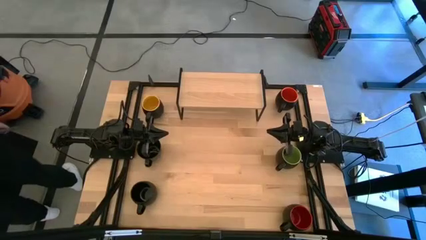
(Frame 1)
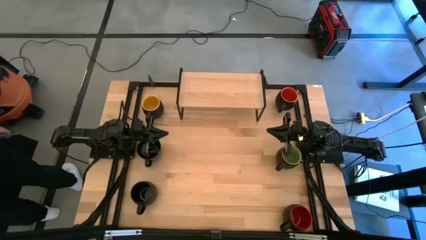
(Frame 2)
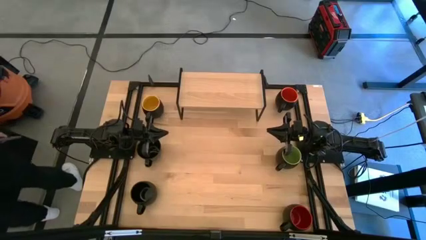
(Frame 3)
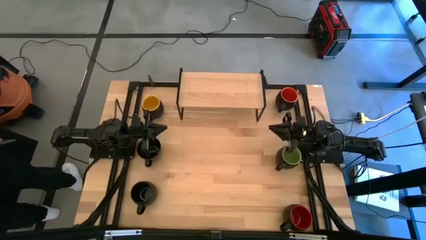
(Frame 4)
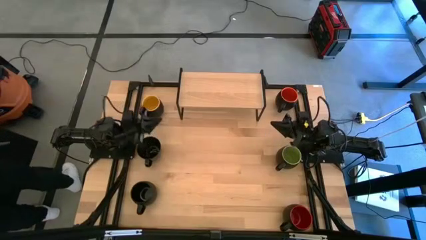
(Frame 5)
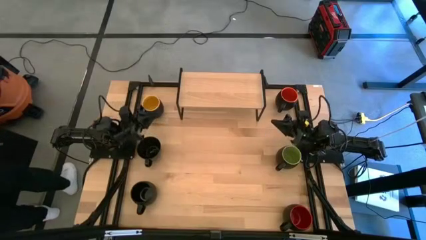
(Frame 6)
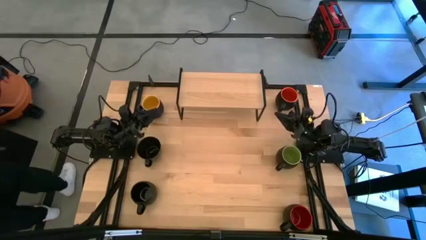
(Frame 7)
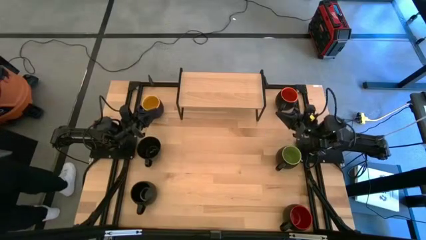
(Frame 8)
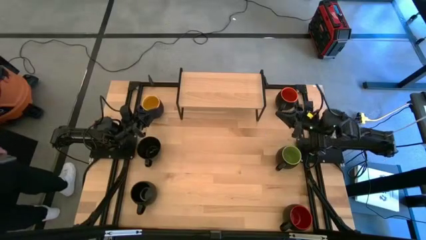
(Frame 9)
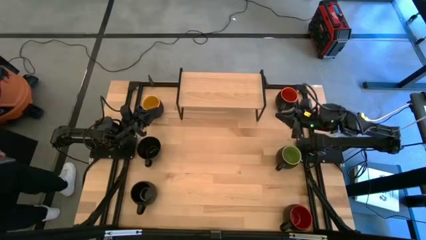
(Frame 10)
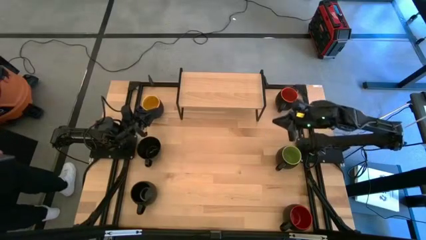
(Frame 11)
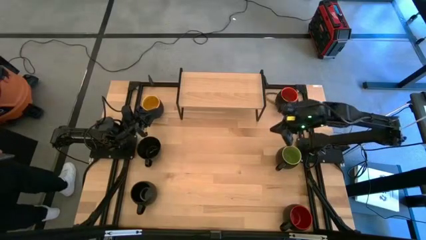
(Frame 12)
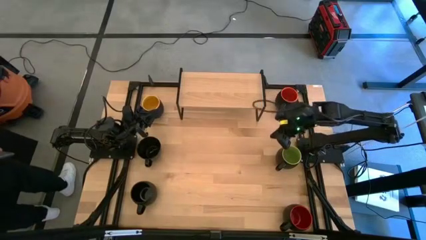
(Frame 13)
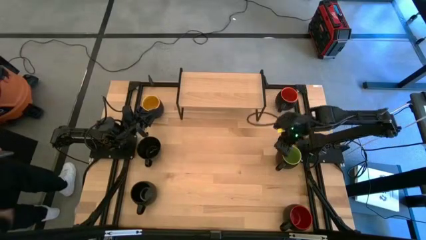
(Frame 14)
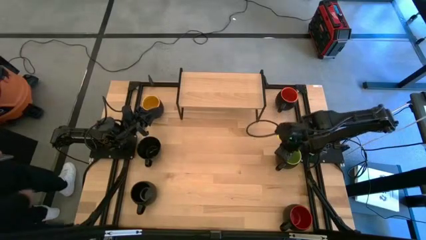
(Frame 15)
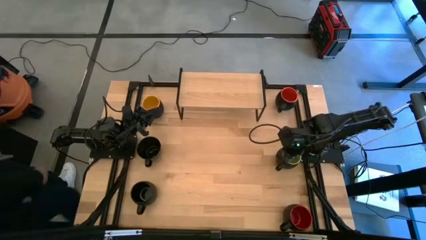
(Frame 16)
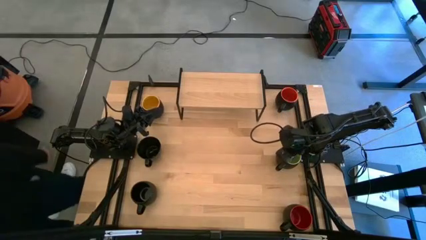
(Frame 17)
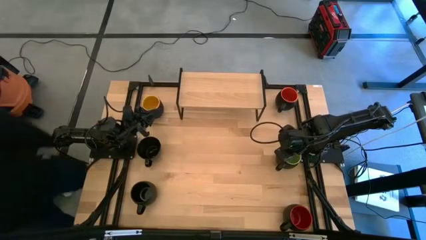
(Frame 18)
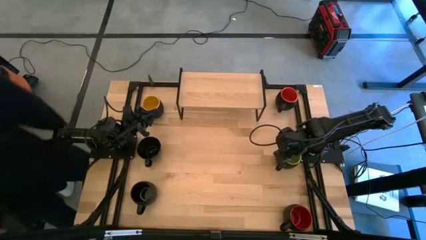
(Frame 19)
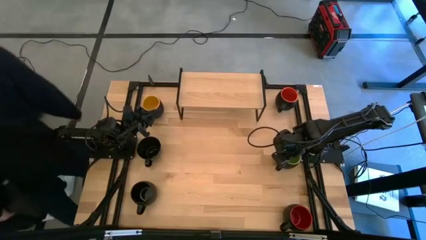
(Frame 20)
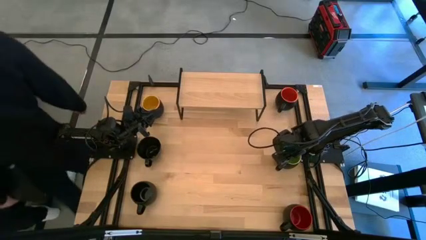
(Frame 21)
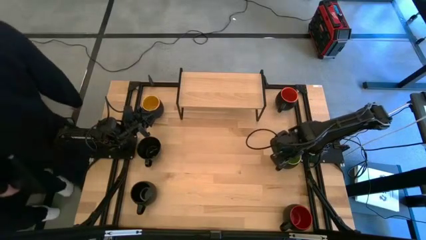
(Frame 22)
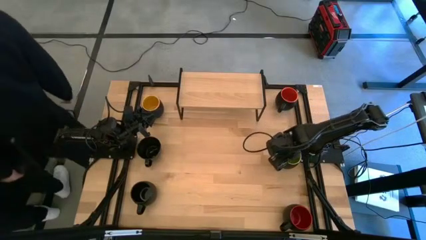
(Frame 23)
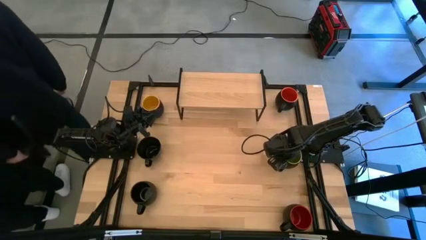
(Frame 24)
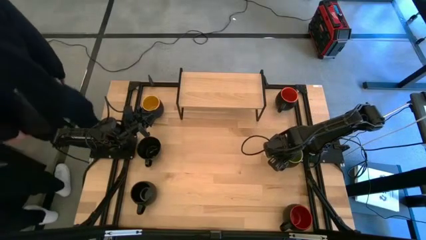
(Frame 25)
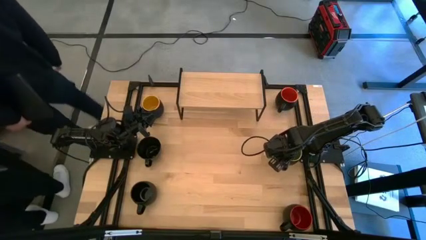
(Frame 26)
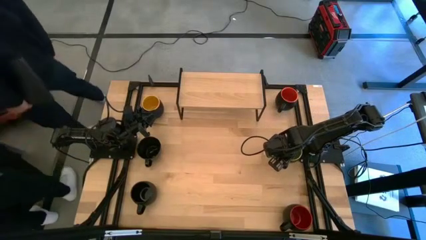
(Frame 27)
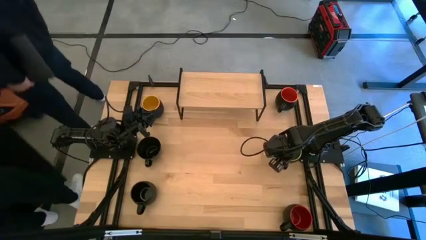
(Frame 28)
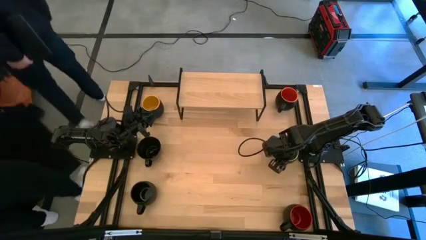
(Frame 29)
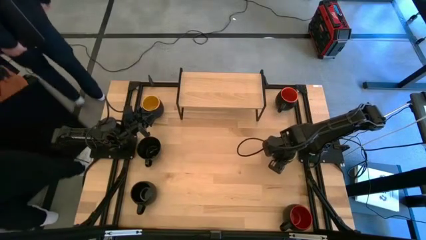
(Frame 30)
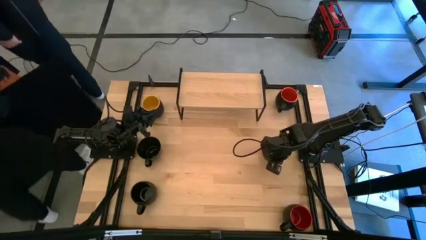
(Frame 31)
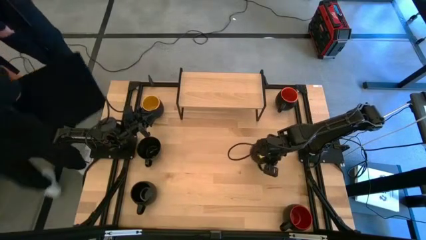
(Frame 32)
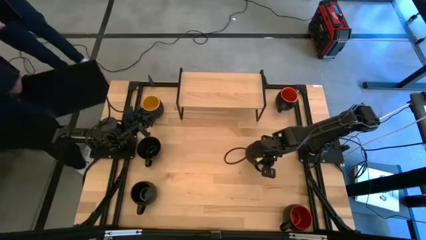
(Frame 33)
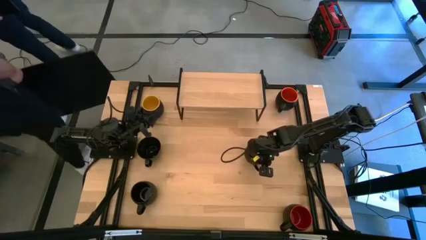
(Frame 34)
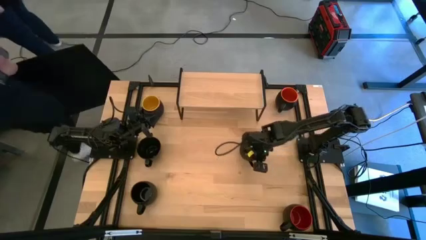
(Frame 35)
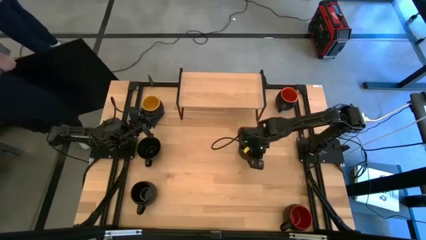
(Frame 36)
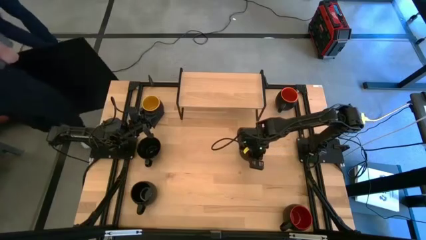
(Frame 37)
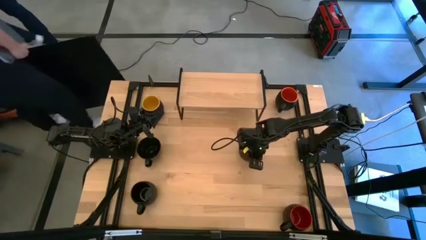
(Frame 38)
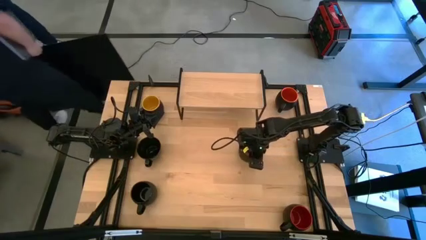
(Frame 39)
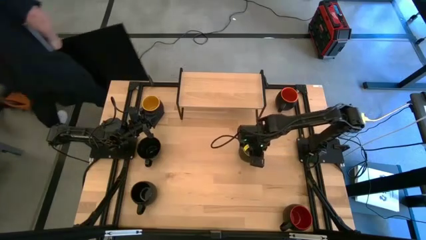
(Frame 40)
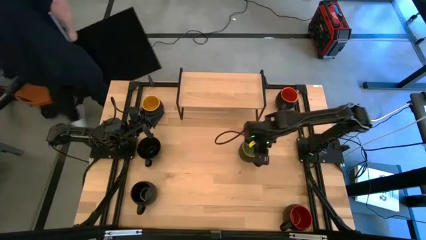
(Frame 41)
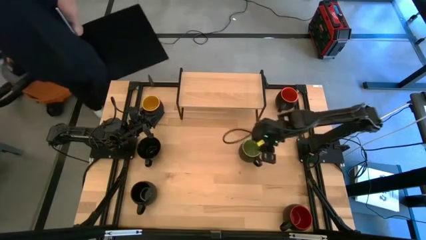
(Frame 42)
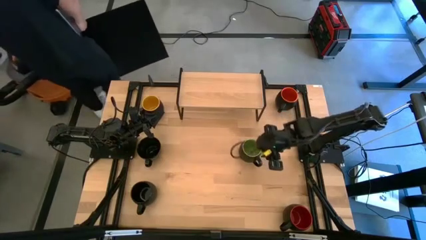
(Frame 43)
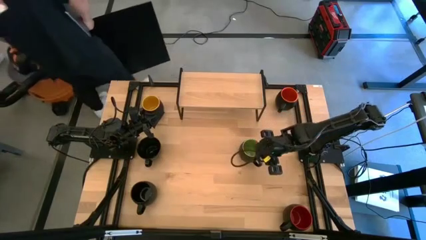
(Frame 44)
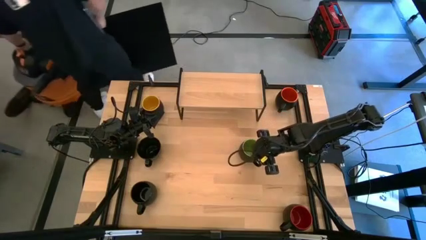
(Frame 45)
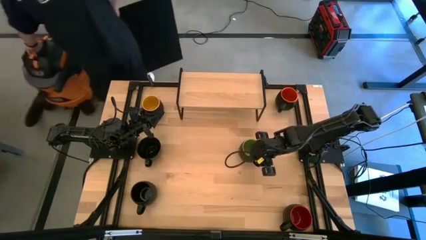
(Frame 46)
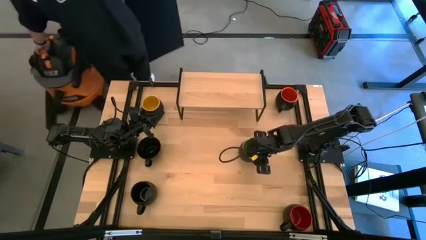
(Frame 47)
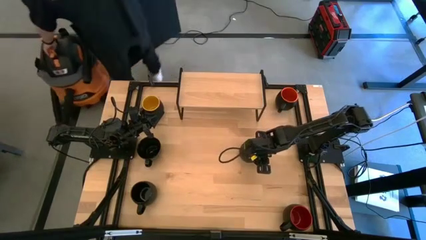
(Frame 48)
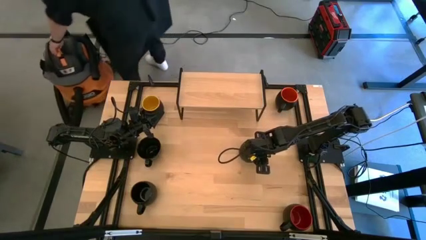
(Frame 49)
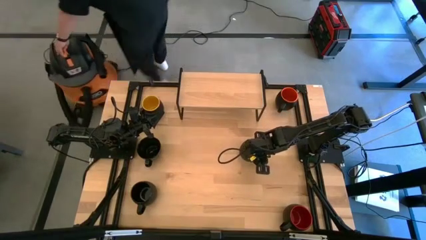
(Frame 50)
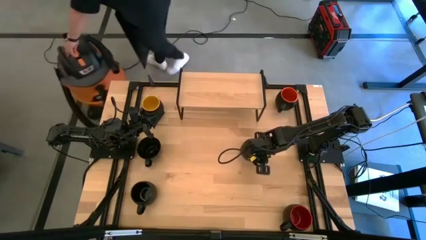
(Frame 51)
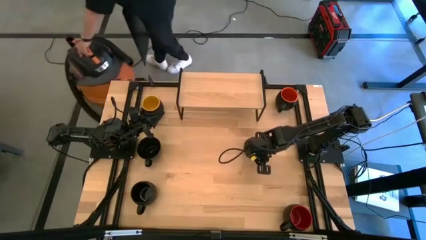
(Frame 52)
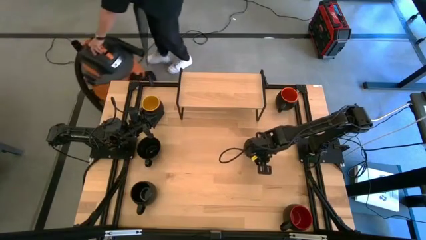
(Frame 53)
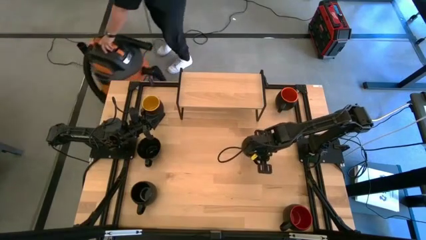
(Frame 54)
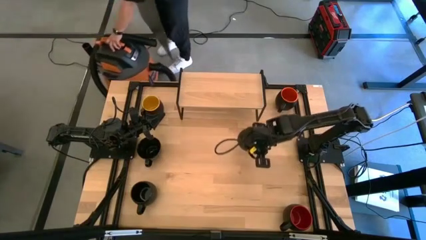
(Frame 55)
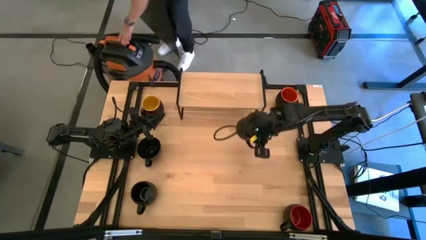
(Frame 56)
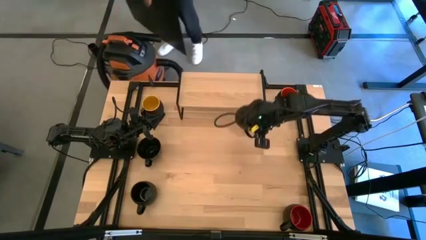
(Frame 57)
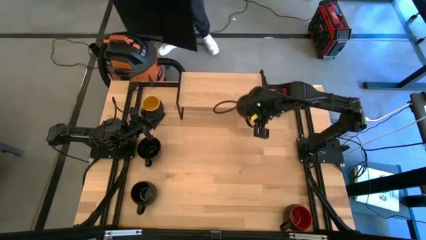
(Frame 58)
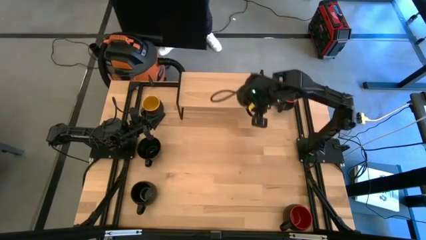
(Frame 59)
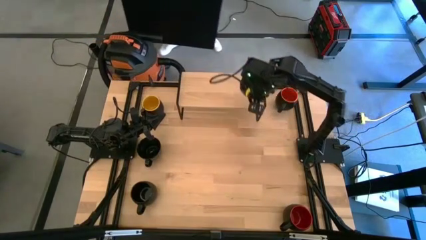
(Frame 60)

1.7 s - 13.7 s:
Task: Place coffee mugs
Put the green mug on the shelf
